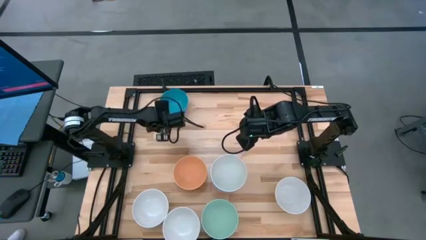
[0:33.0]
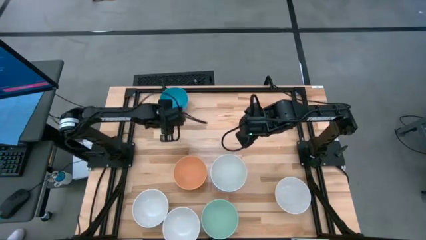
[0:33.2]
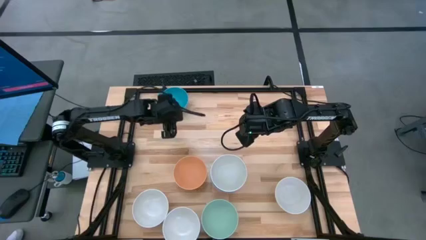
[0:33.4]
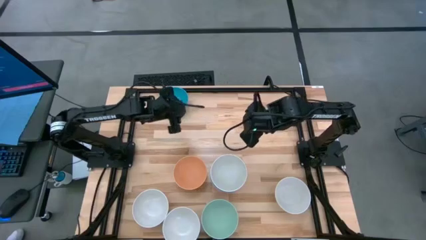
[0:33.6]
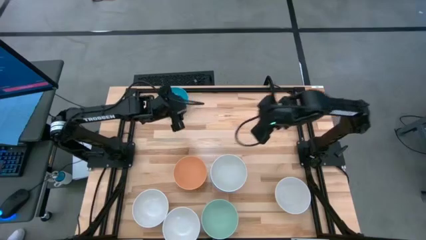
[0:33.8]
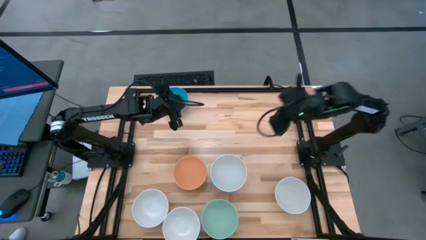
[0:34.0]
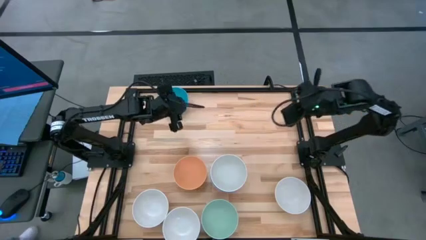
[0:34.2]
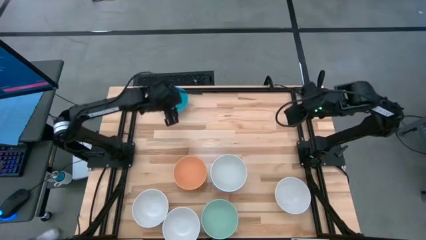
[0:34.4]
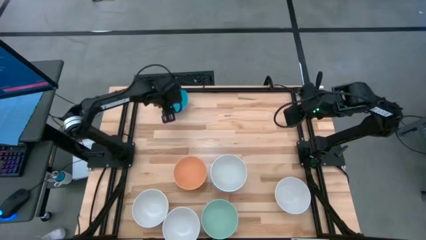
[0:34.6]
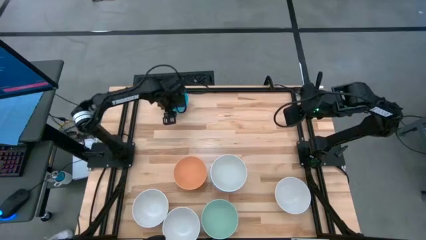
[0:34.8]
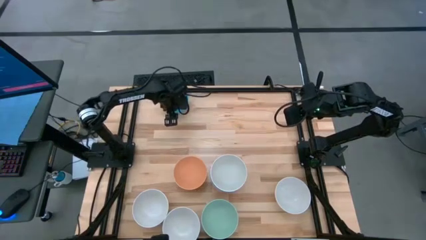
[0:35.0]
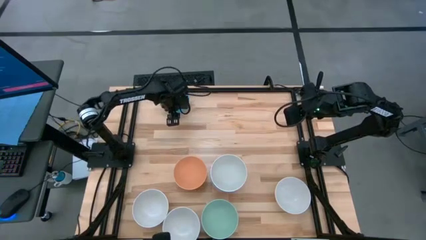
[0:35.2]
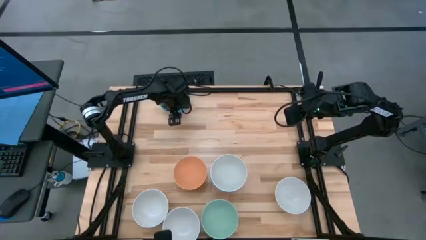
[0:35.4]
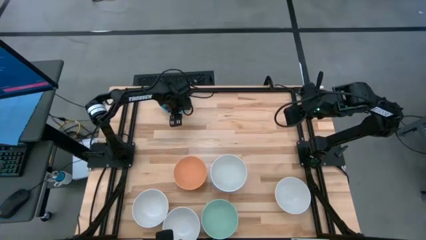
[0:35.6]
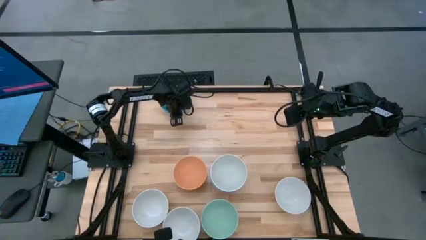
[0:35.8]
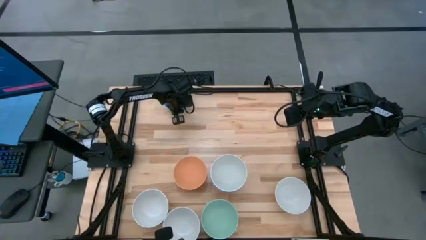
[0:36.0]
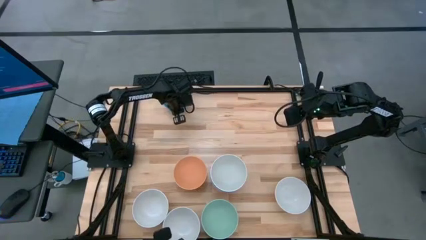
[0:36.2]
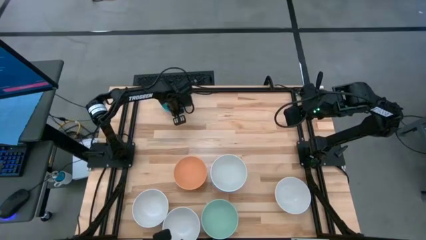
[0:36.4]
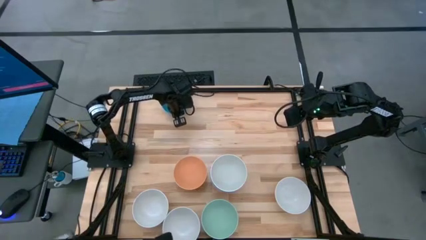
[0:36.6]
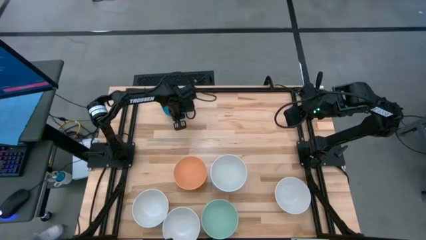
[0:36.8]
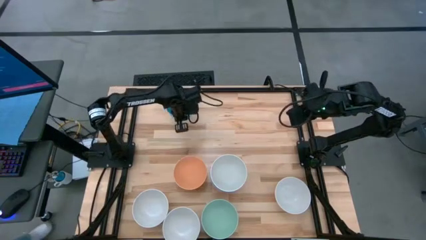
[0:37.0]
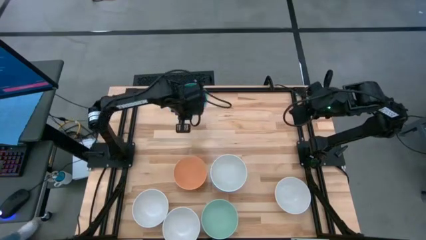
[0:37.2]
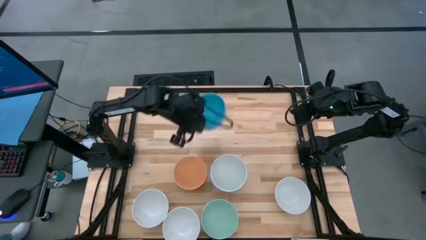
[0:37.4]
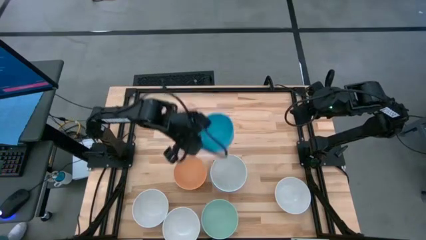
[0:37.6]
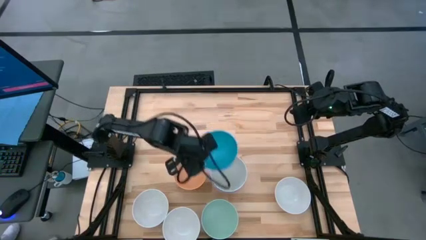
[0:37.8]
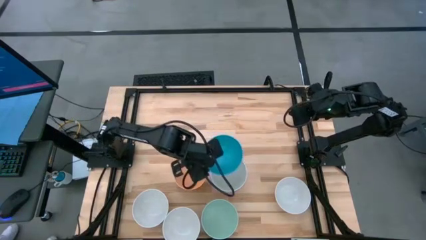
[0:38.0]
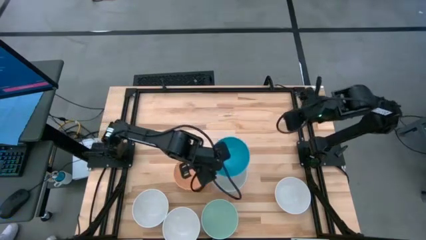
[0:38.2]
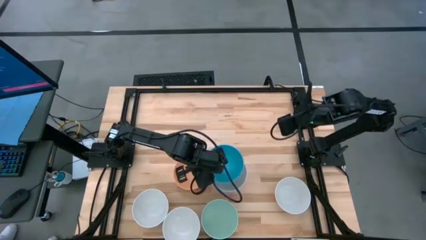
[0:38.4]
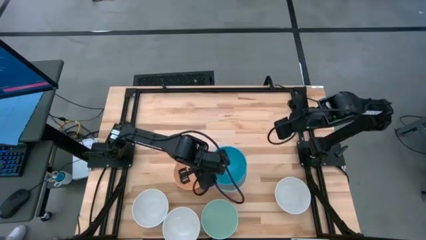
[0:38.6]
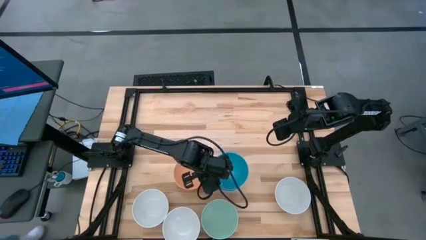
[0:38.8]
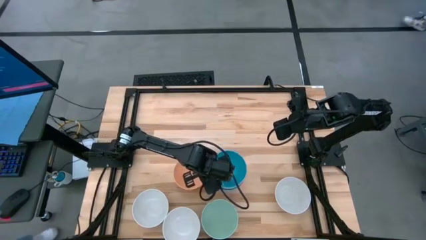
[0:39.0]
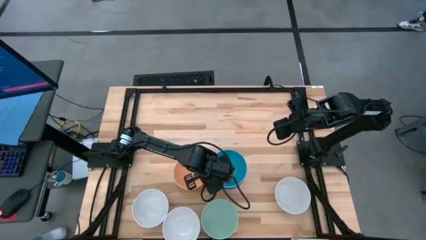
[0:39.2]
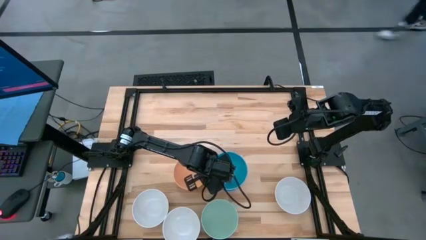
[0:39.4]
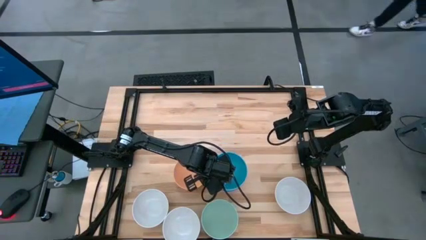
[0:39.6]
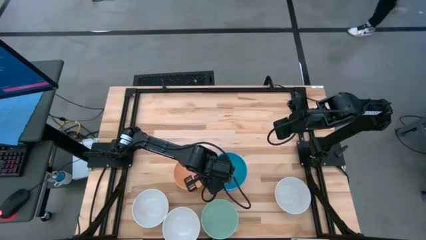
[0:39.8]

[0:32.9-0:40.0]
Task: Nest bowls inside each other
Stack the blue bowl on the white bowl

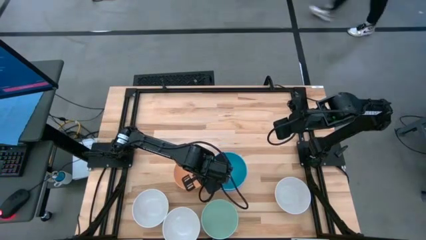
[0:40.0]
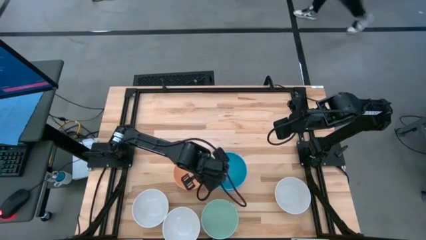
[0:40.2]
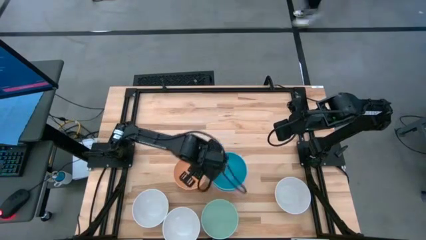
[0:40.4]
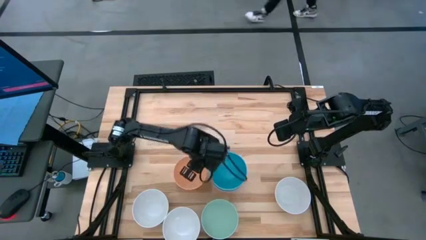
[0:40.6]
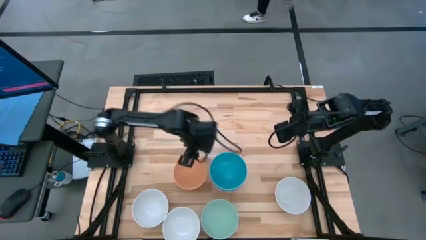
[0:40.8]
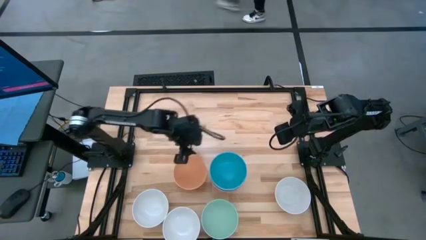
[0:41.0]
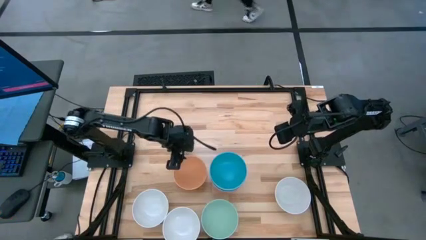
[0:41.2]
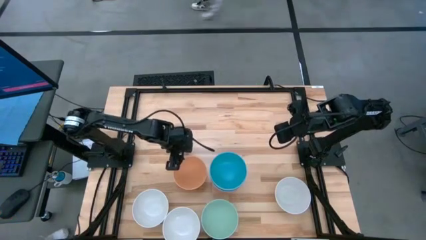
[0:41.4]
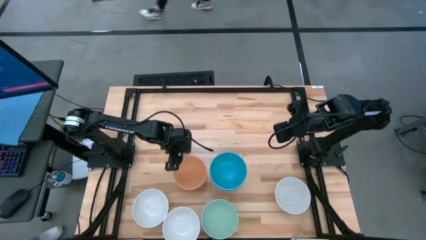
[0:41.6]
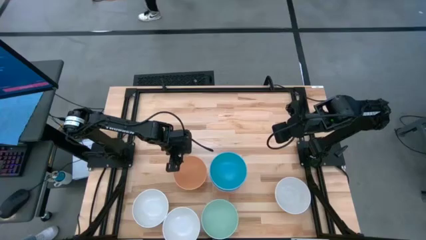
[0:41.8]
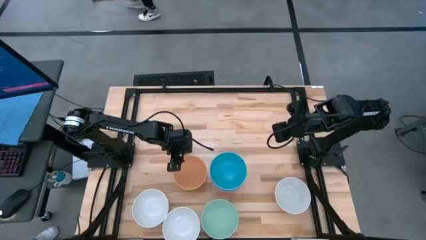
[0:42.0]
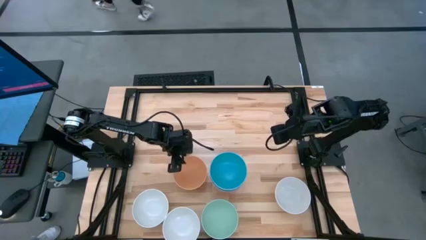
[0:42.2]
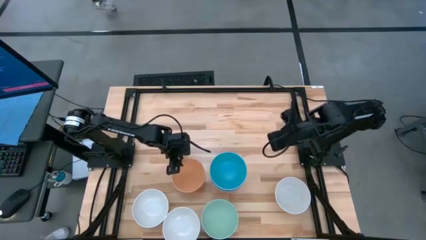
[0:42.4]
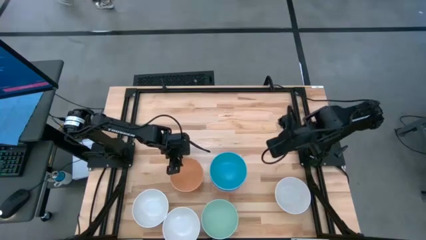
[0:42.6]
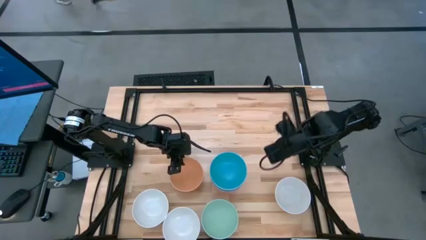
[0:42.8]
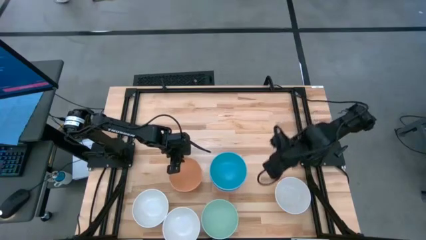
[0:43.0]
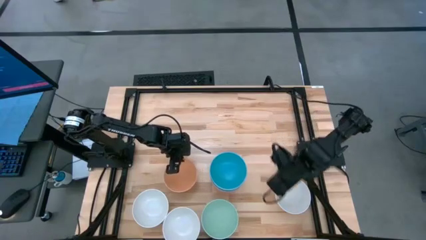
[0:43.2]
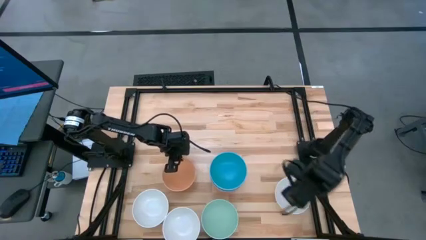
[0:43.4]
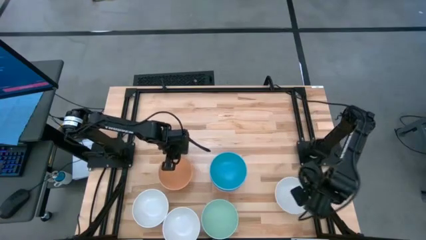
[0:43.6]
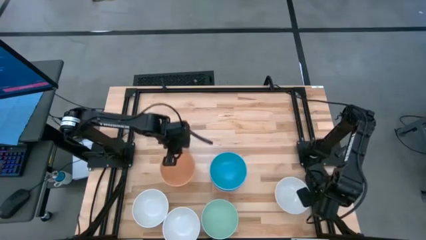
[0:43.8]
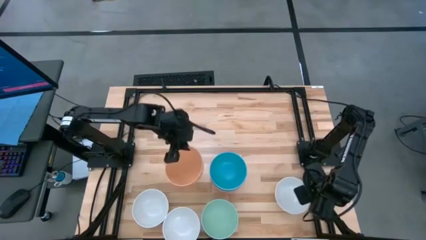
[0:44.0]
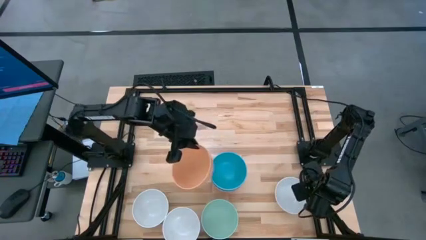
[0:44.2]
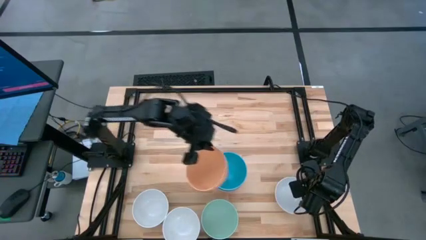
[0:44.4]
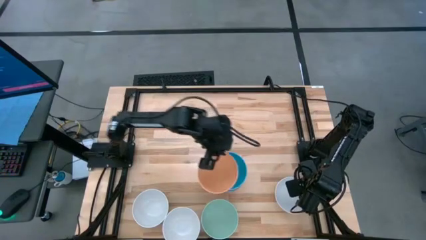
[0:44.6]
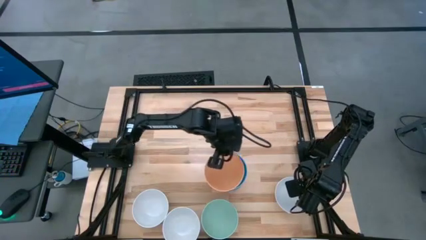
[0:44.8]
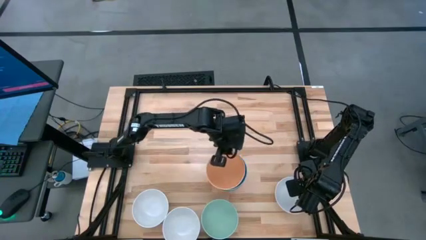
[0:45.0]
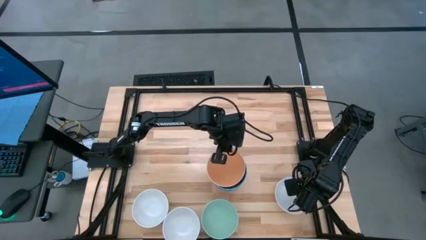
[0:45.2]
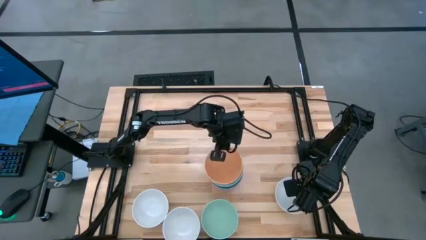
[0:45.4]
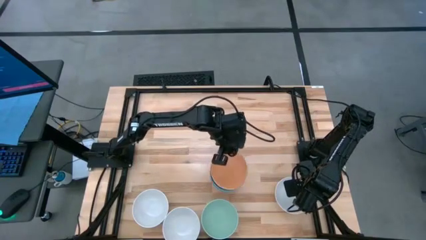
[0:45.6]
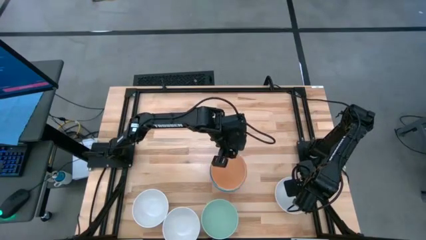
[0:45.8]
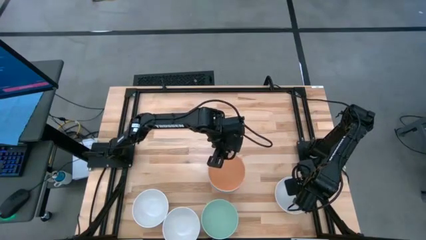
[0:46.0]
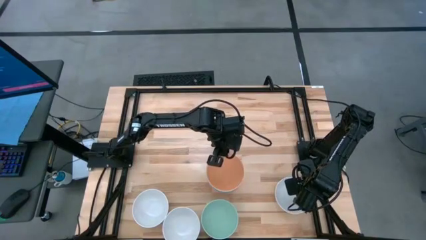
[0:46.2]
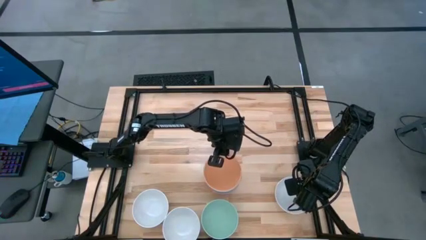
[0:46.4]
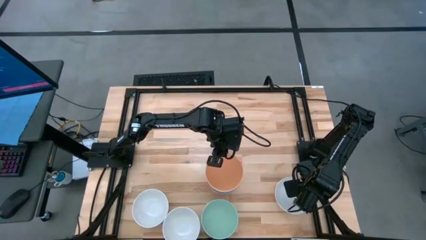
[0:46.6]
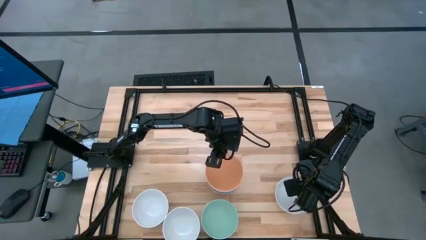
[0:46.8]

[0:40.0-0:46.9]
Stack the orange bowl on the blue bowl

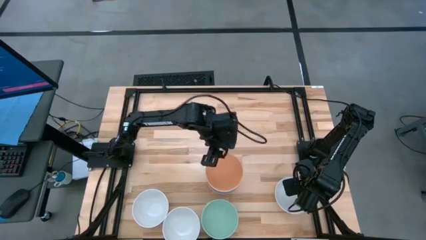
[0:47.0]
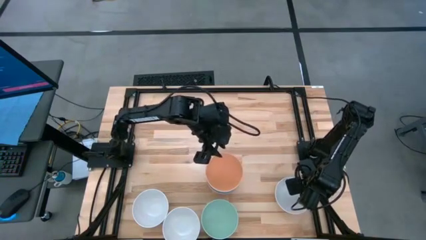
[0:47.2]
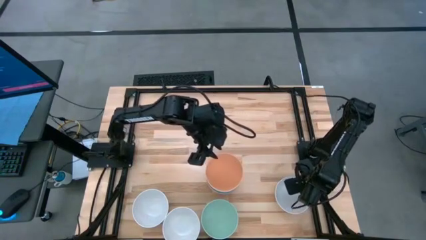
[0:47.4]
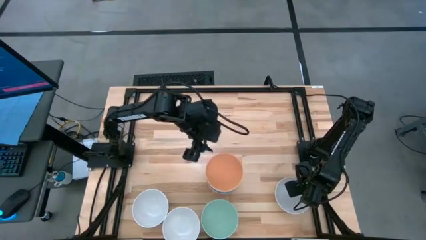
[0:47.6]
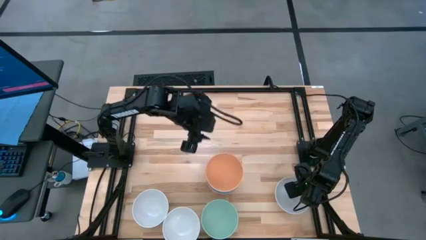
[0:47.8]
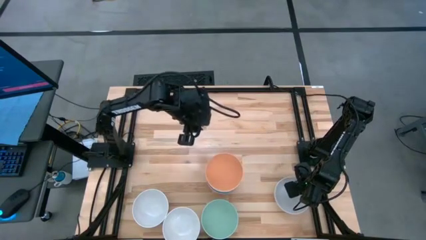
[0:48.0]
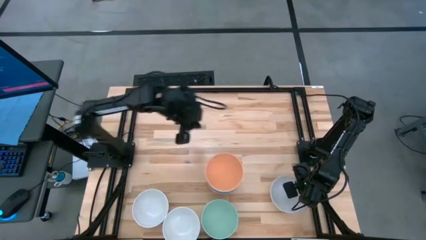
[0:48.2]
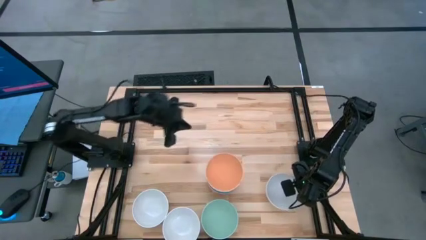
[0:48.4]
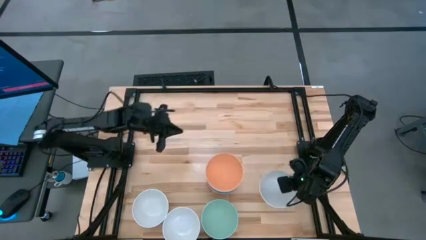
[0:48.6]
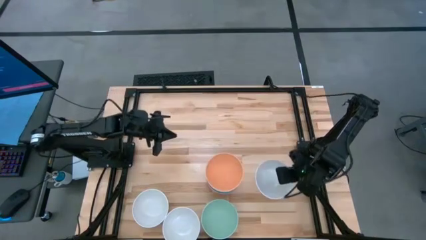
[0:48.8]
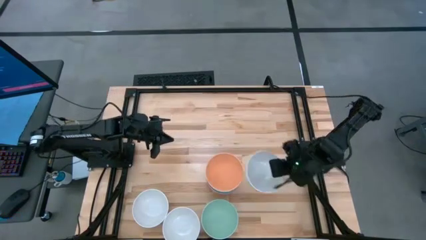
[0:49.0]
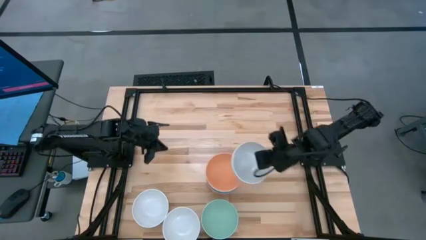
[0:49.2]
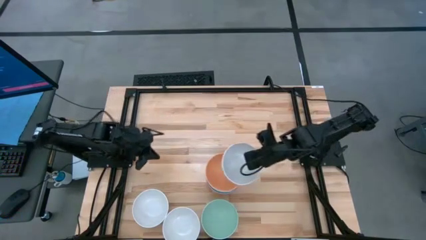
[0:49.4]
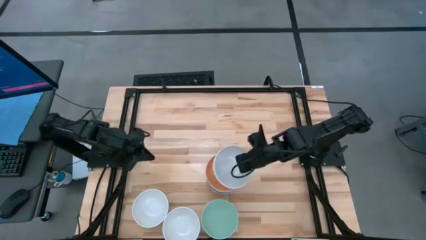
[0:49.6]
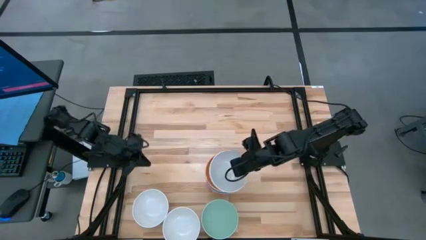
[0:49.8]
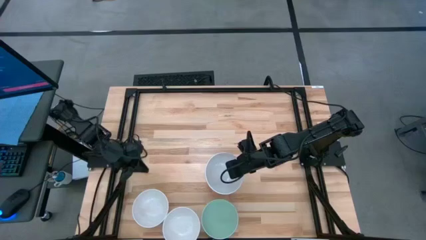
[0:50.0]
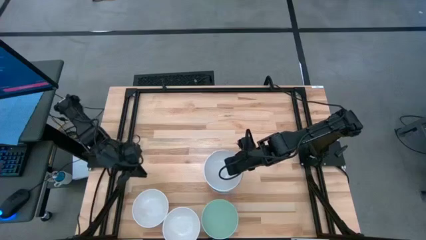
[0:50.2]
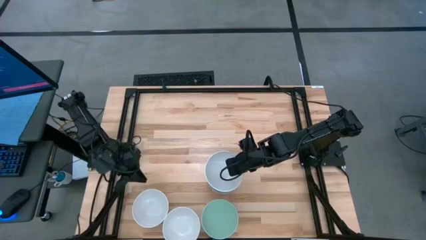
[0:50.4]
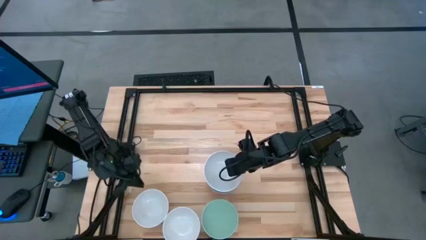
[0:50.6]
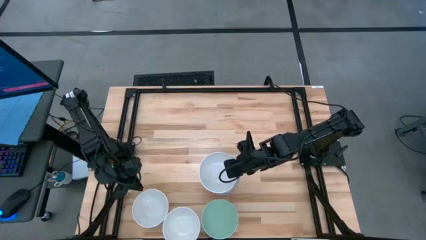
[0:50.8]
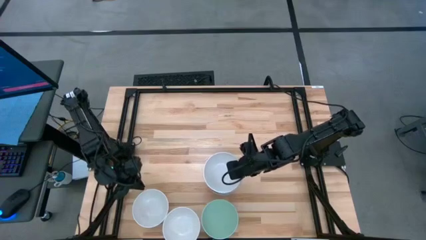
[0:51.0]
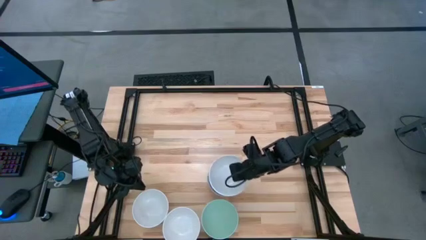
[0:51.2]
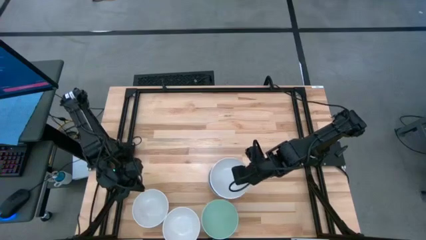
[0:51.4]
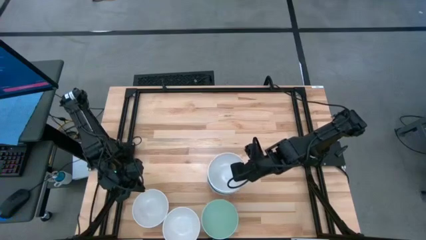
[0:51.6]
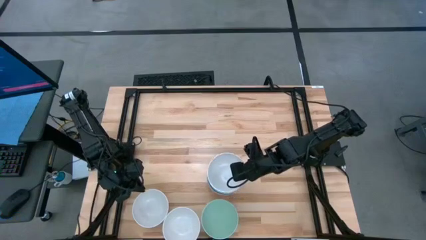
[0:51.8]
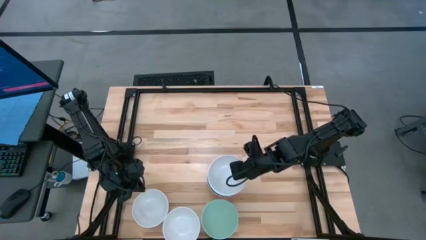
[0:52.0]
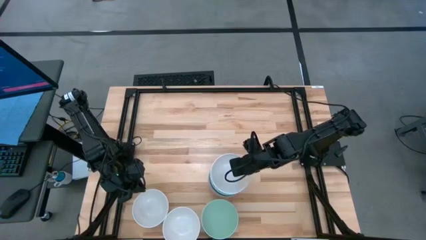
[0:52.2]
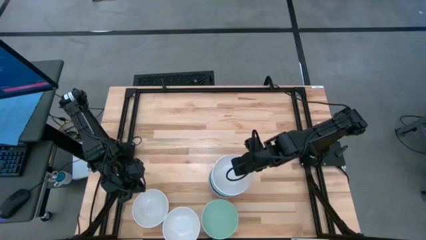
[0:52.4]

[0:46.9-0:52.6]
Stack the white bowl on the orange bowl
